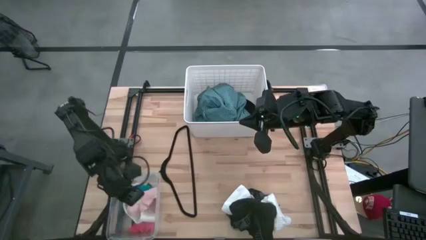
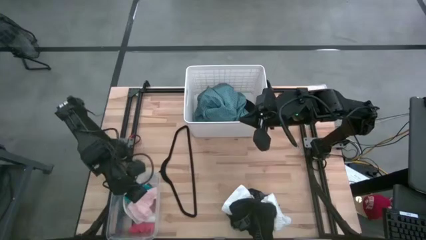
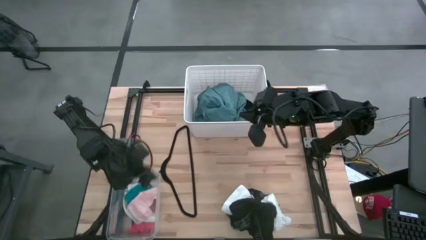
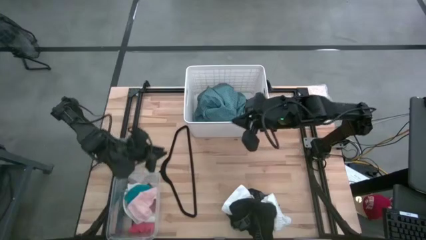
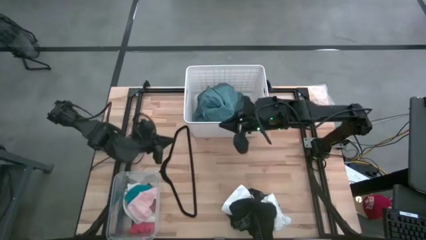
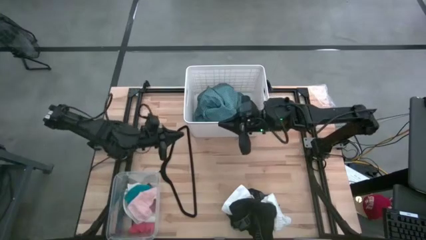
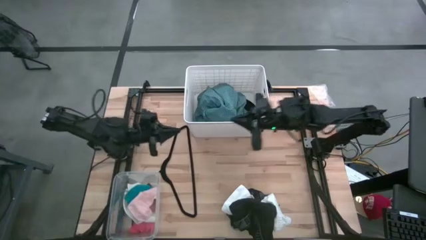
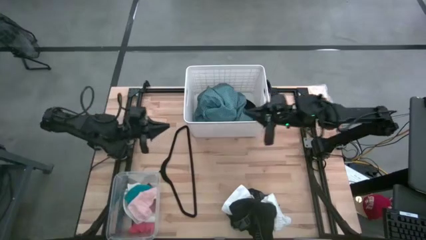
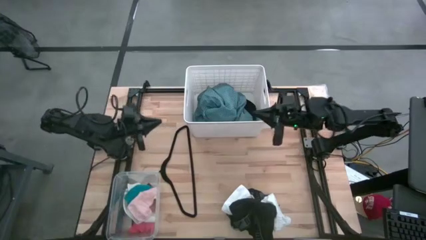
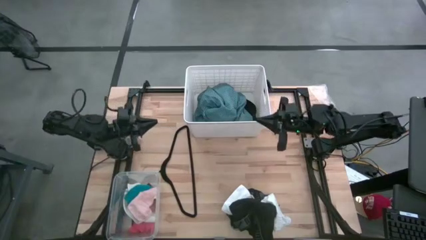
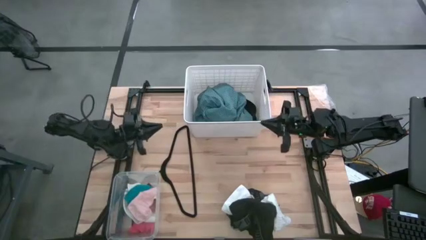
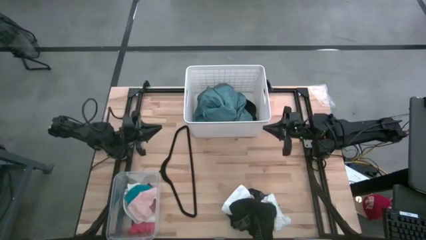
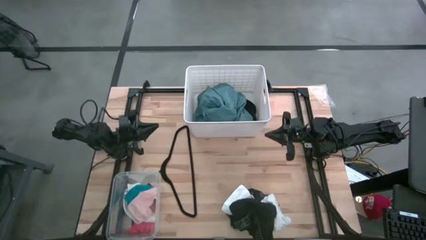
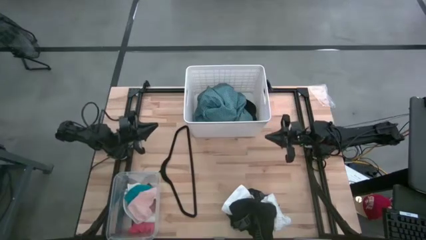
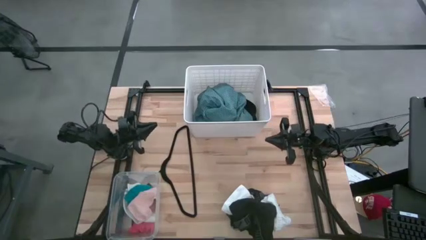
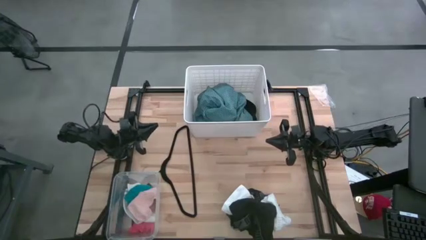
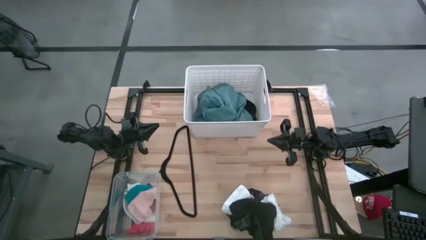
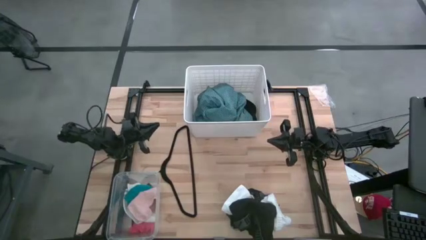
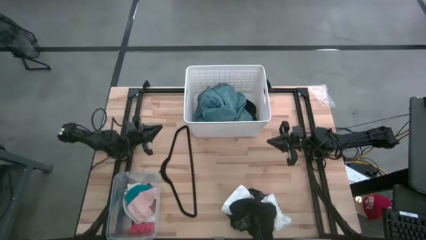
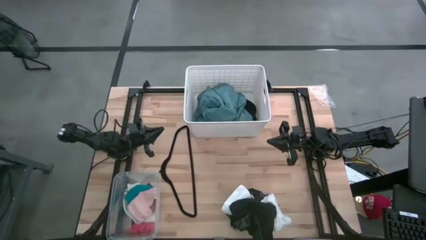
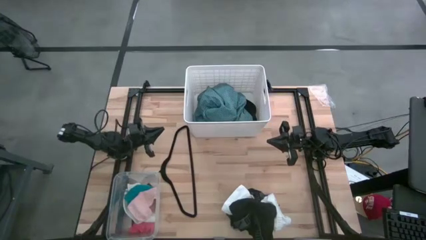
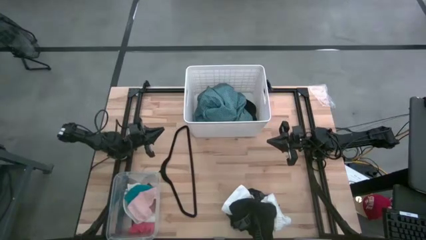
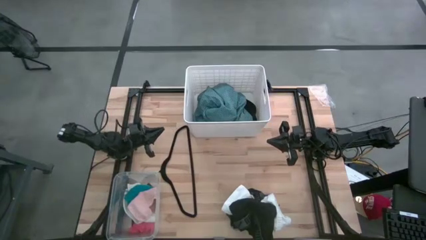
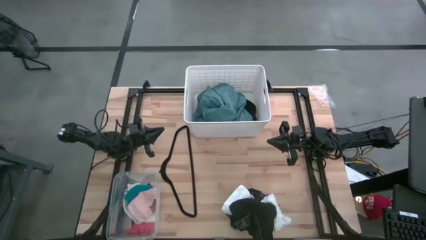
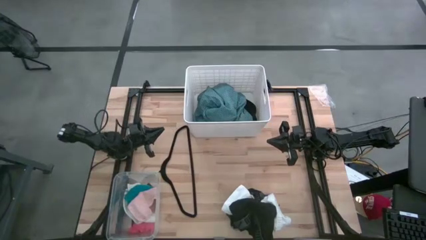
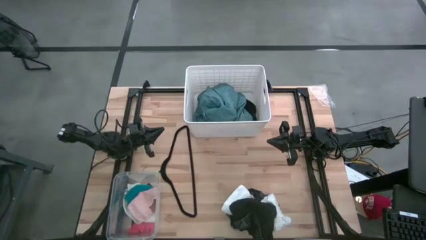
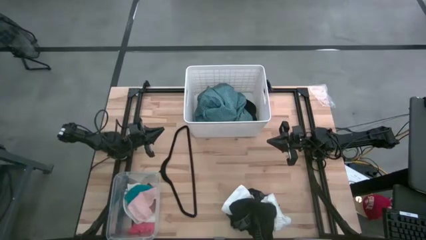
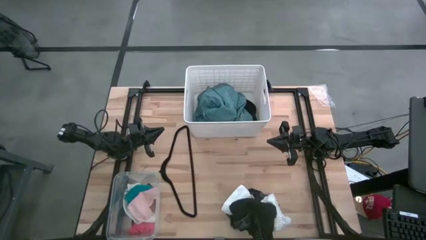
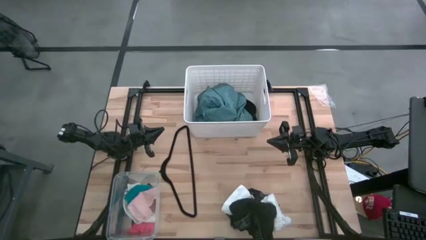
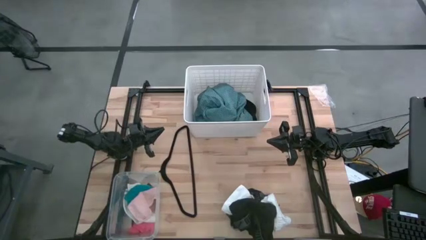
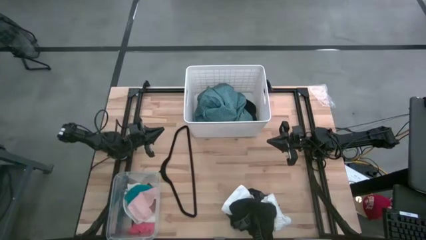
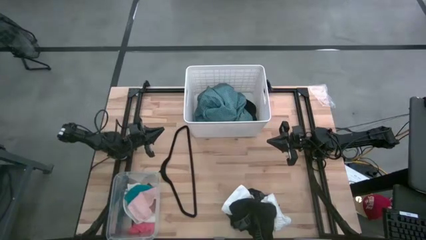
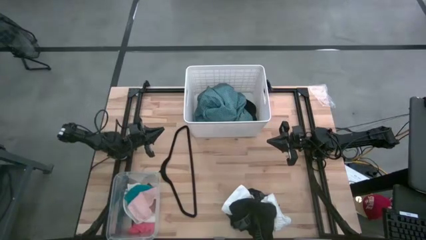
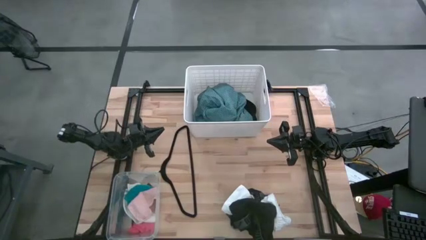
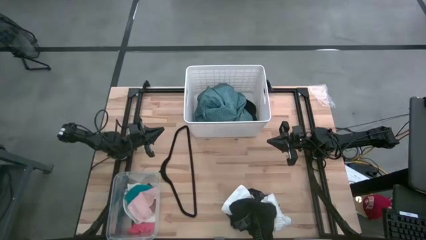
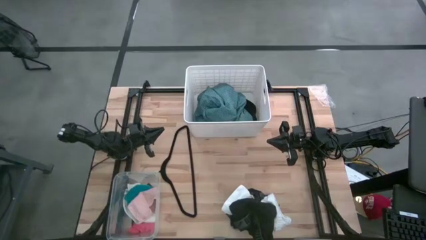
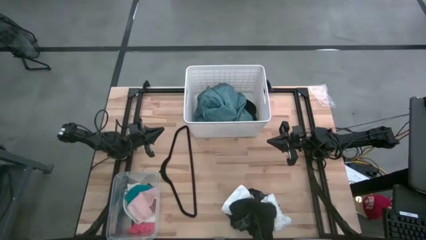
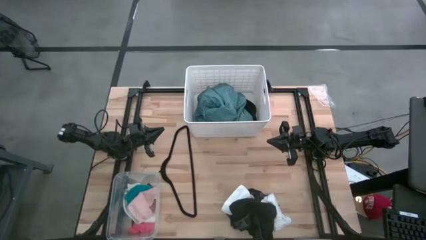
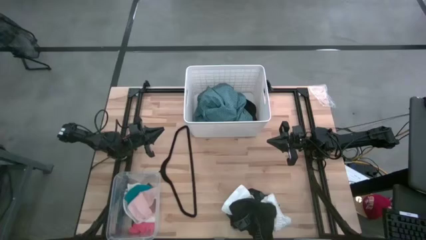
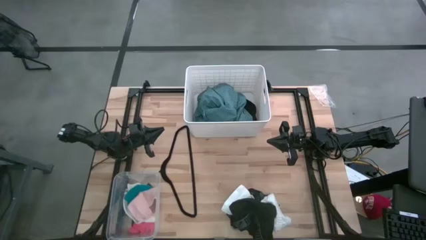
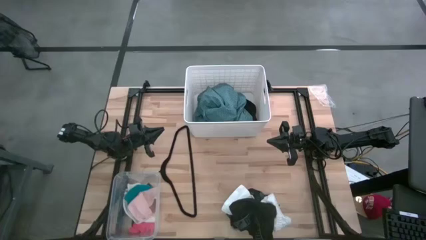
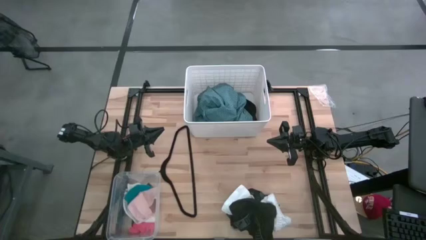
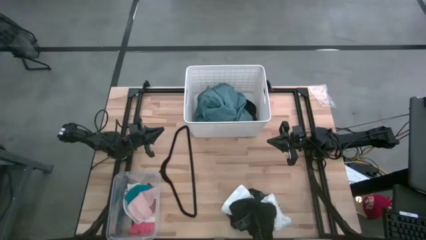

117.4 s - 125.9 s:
Task: Pick & Place Cloths
Return to Home Position

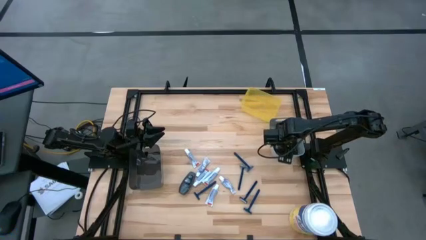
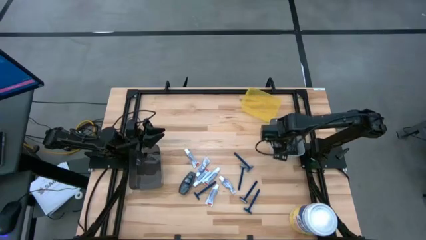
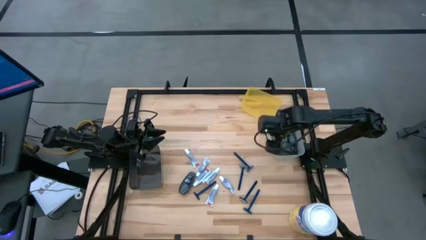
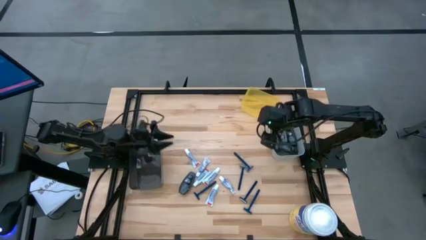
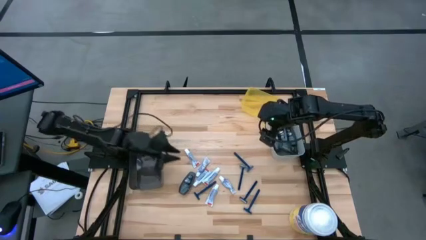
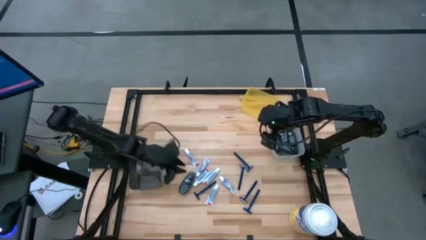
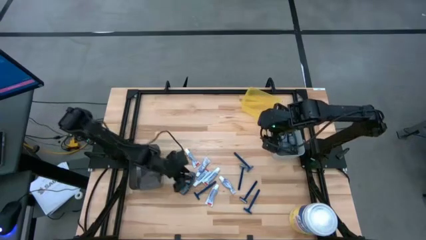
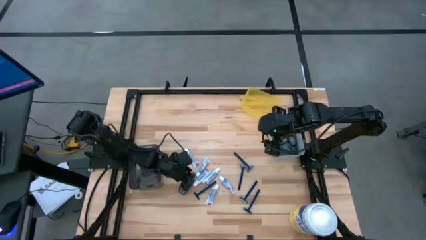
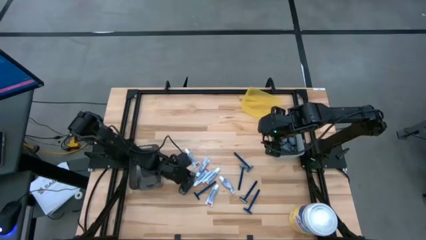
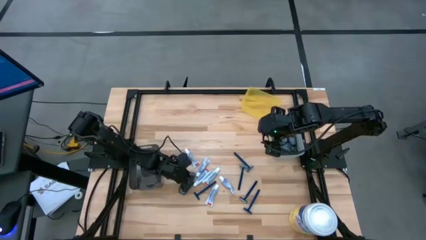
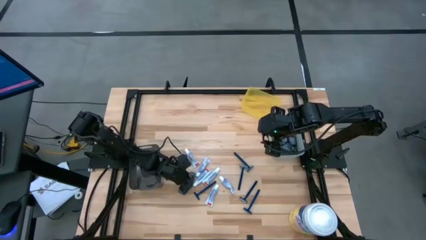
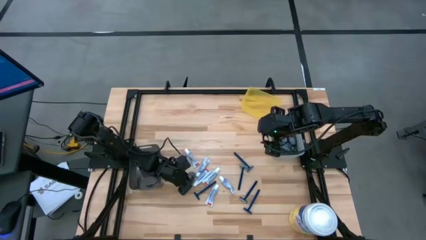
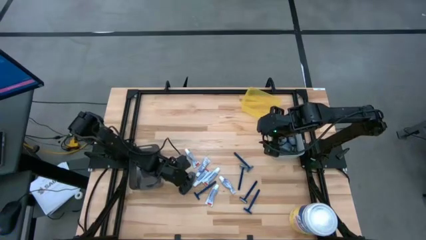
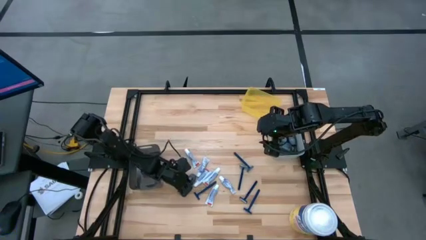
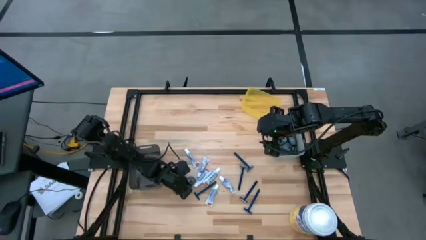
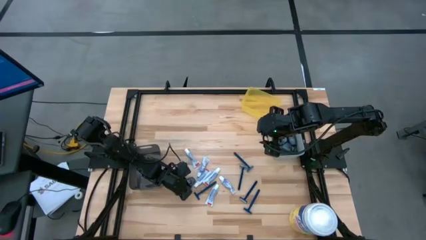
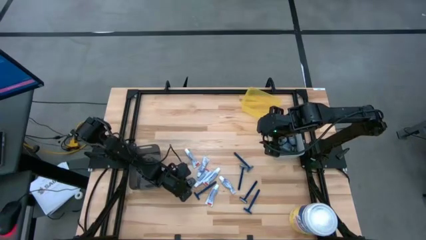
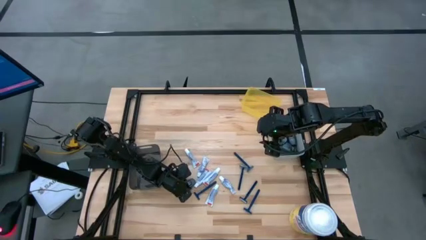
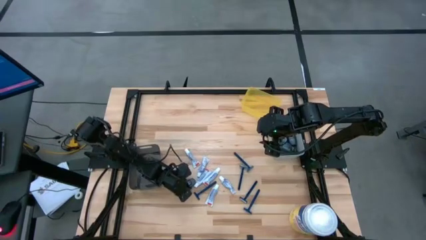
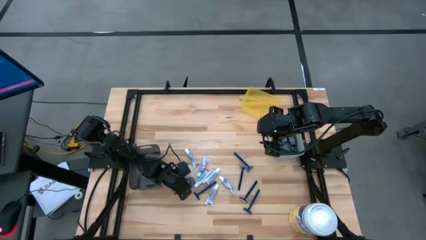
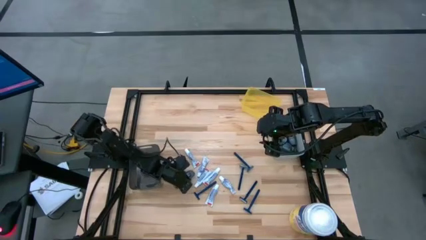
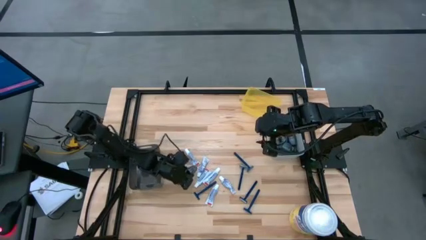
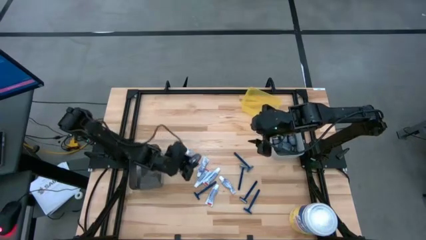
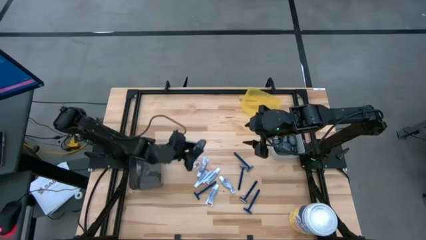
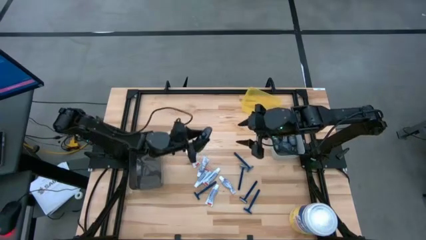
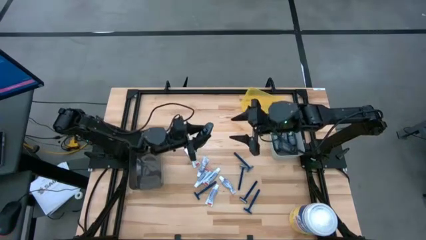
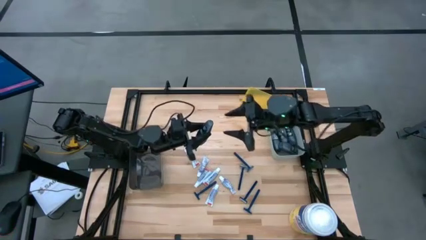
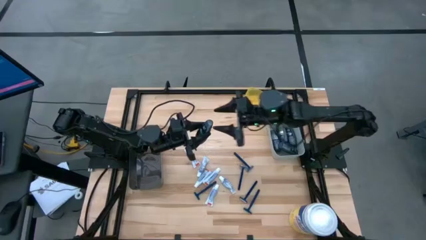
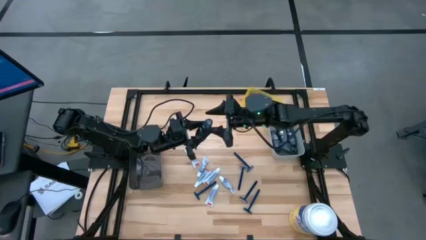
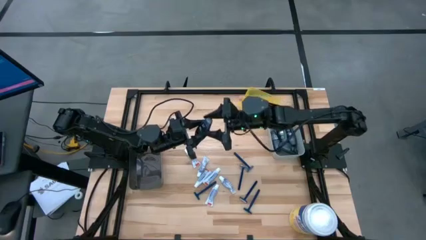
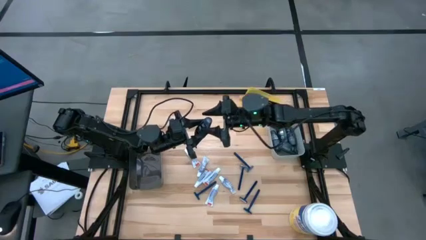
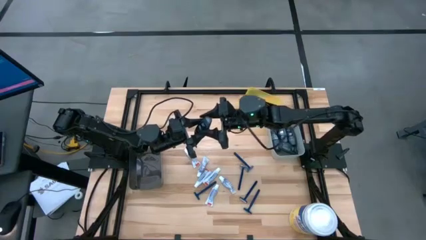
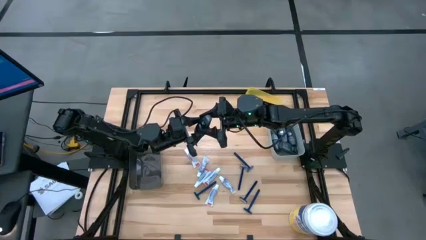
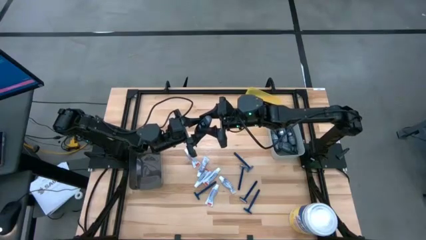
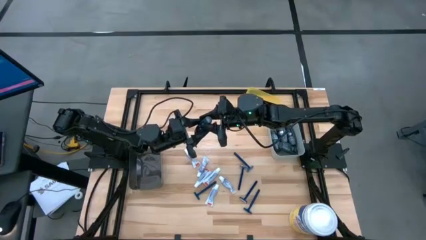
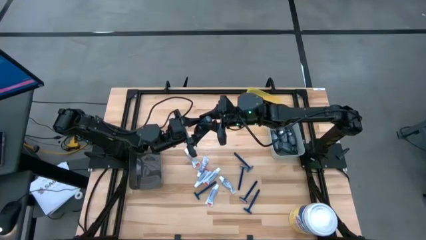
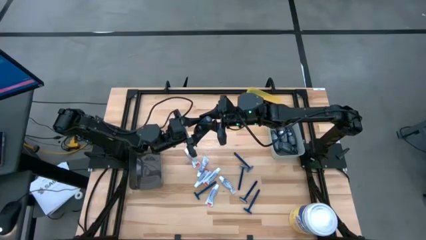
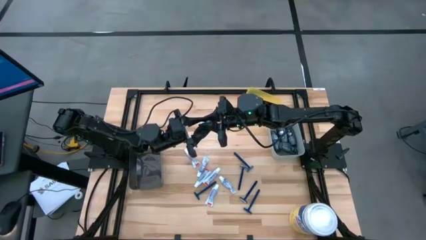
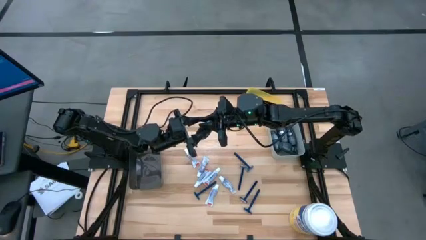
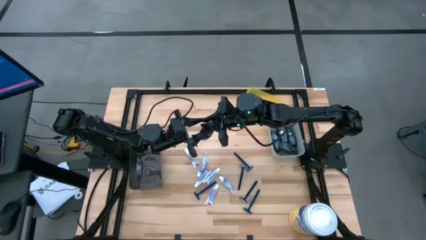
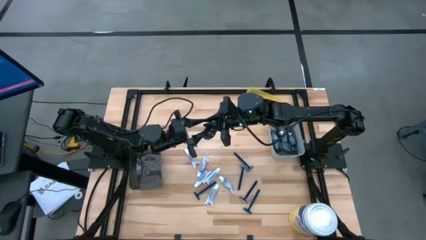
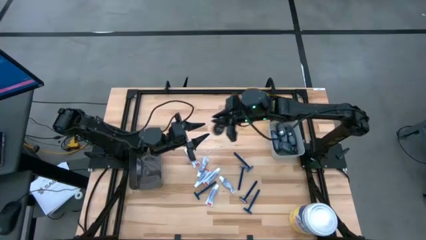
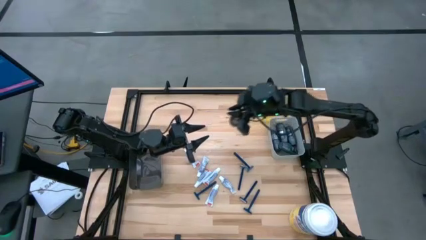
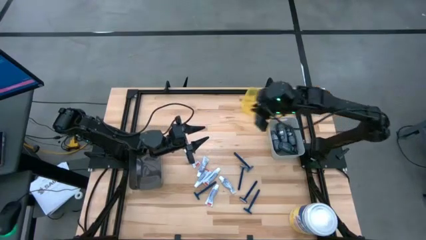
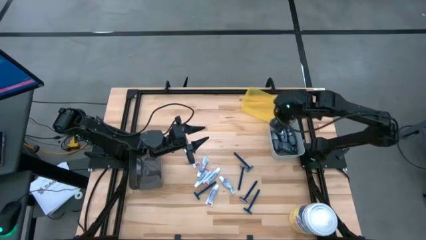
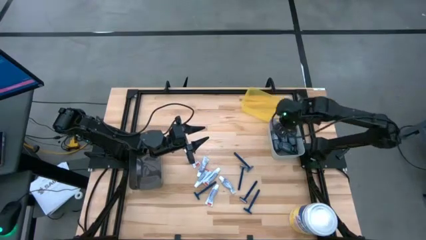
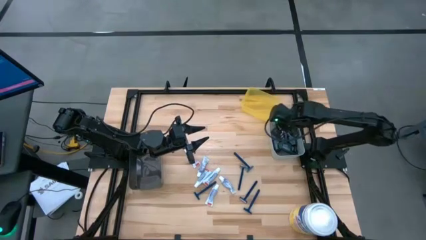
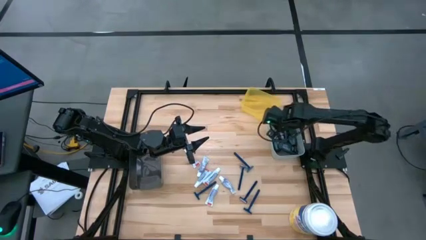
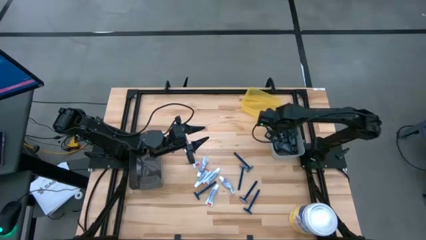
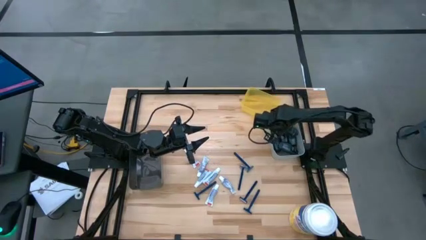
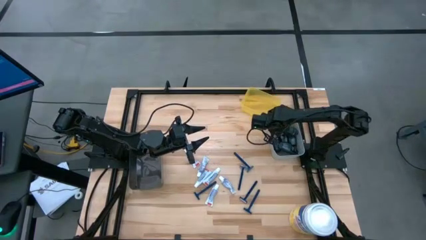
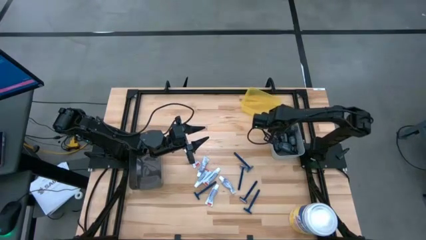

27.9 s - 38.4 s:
Task: Pick & Place Travel size toiletries
Put the gray deodorant bottle into the white bin
